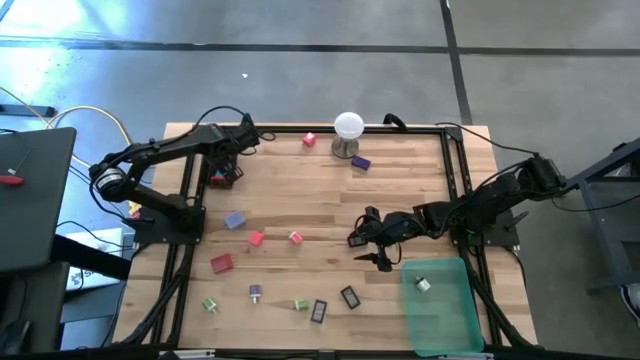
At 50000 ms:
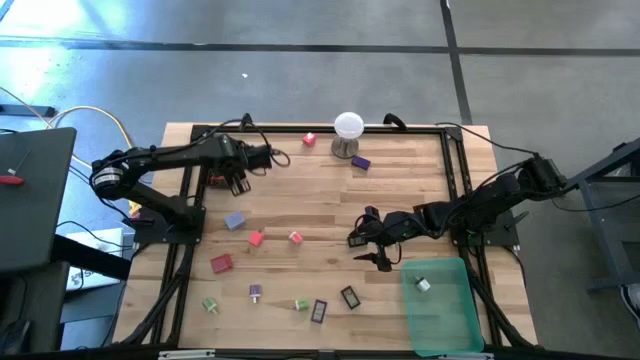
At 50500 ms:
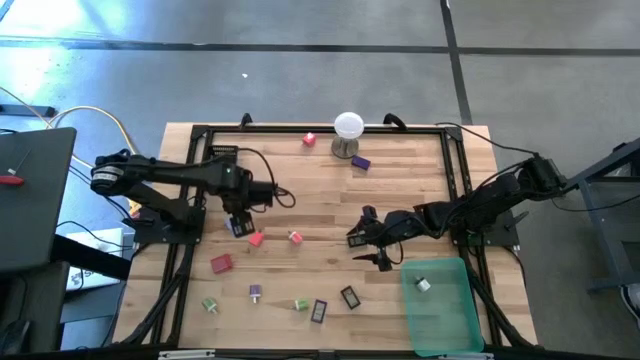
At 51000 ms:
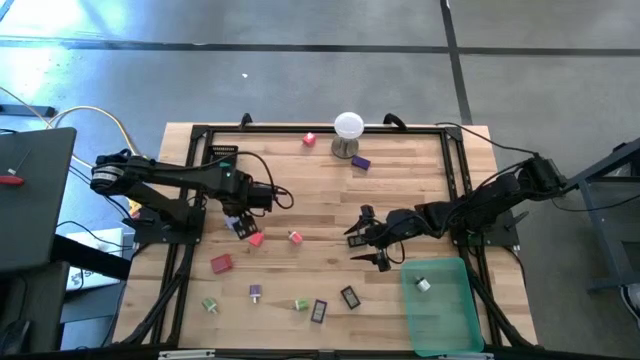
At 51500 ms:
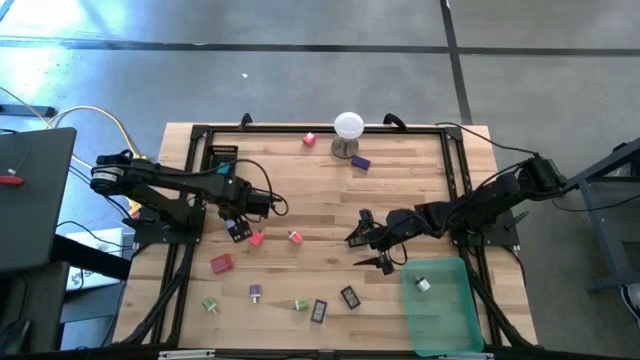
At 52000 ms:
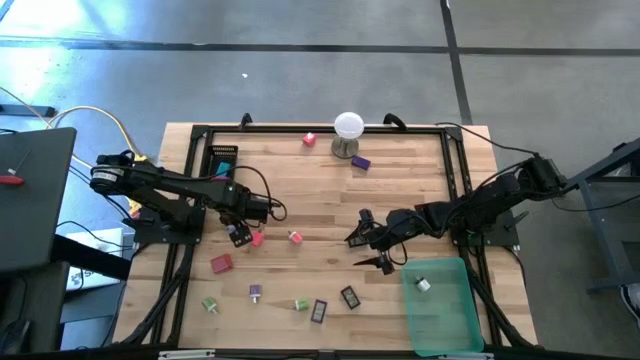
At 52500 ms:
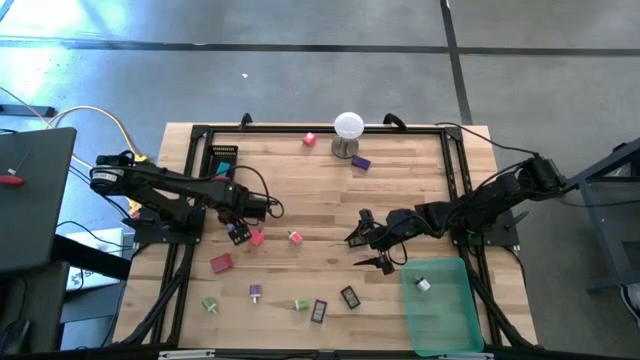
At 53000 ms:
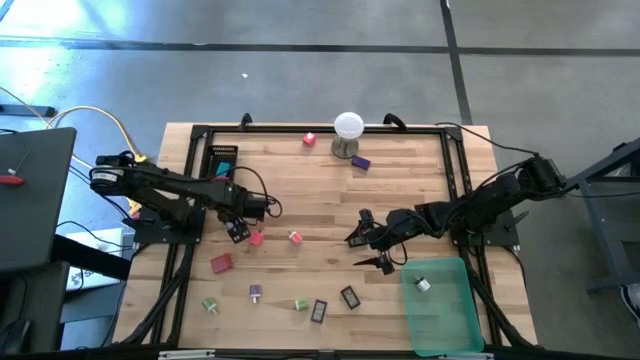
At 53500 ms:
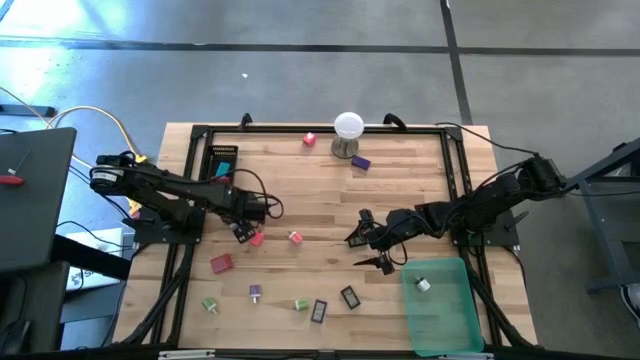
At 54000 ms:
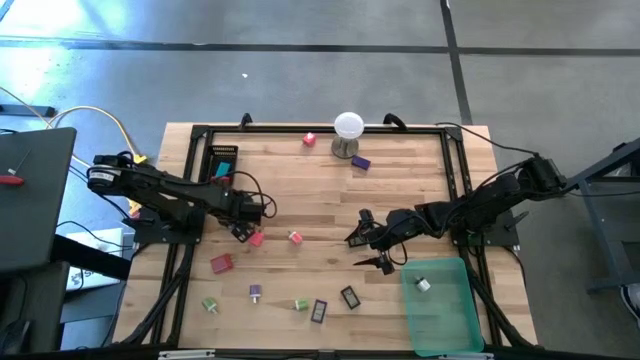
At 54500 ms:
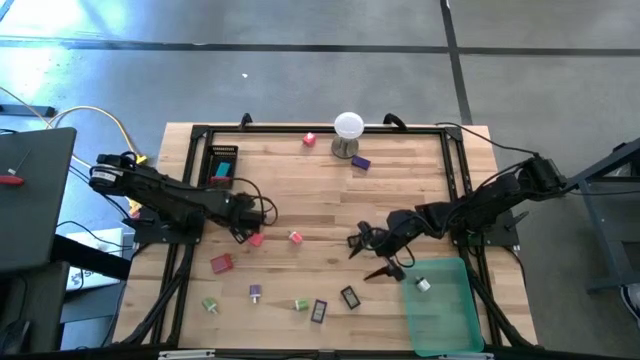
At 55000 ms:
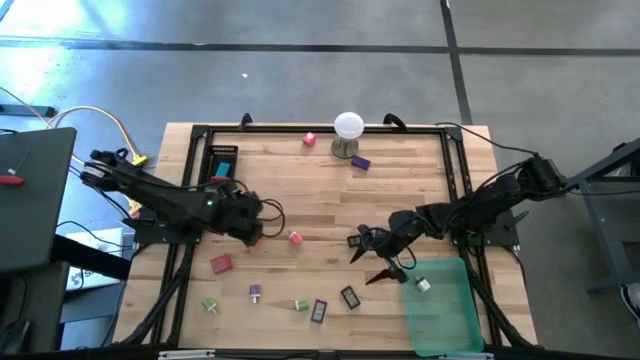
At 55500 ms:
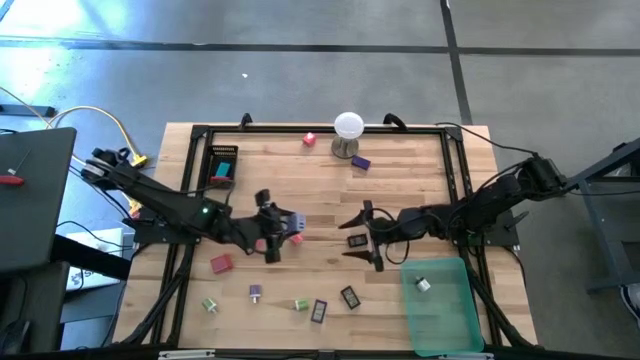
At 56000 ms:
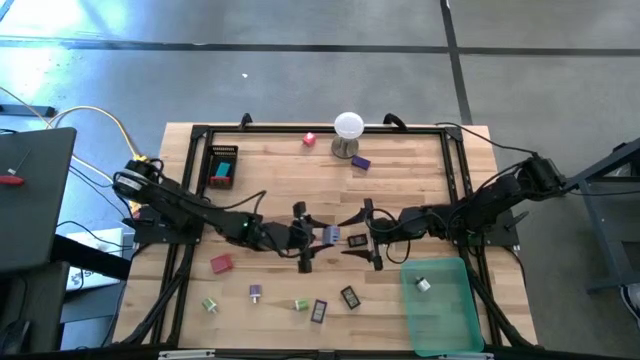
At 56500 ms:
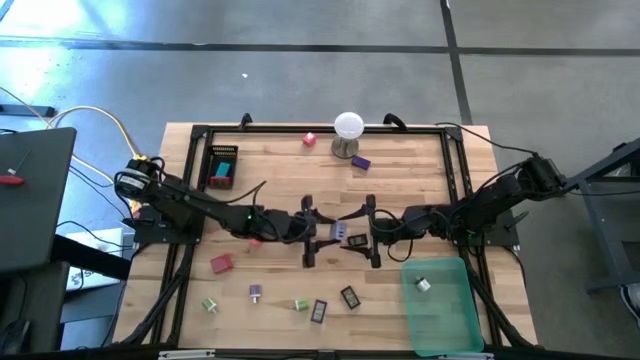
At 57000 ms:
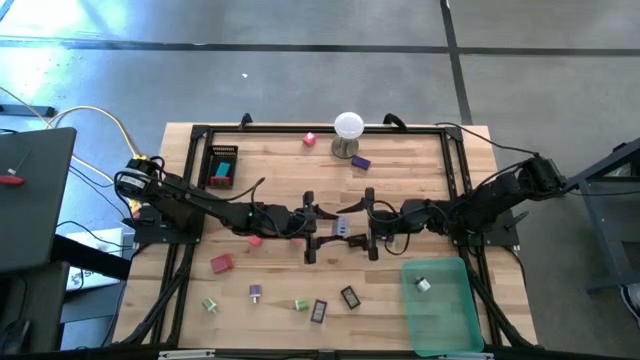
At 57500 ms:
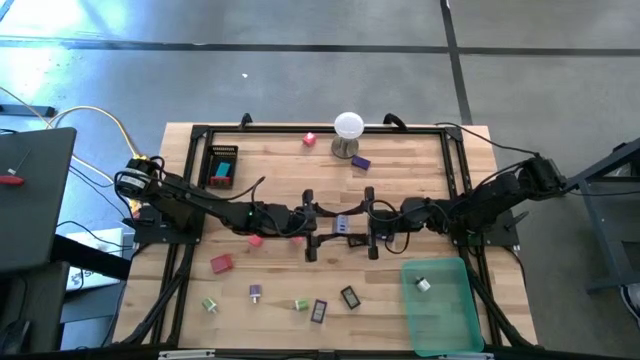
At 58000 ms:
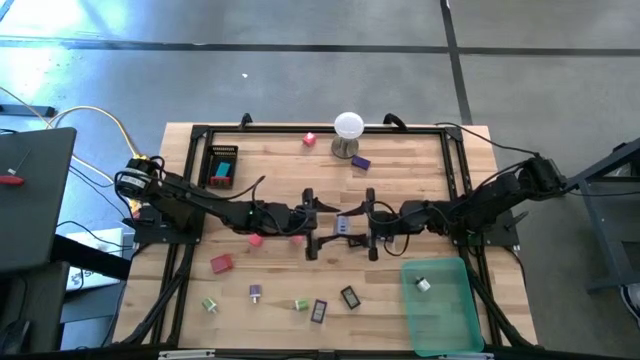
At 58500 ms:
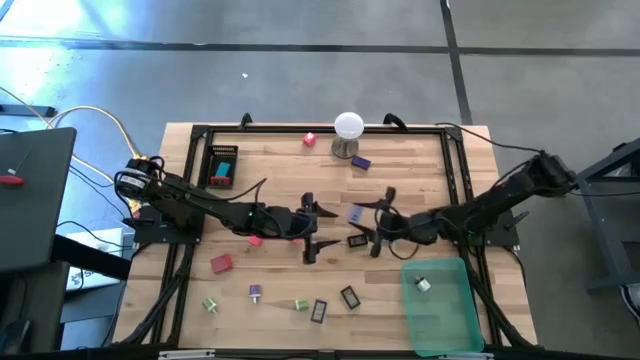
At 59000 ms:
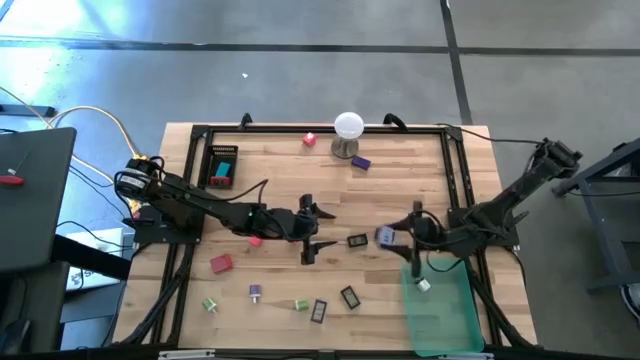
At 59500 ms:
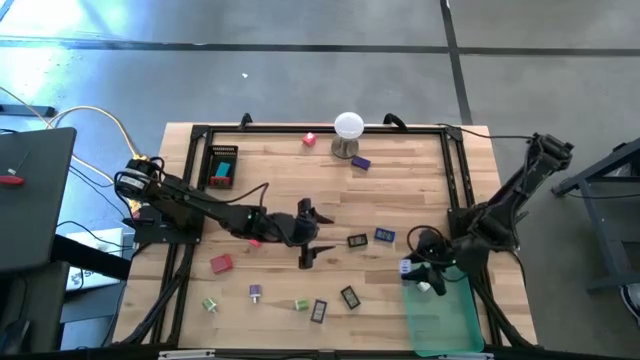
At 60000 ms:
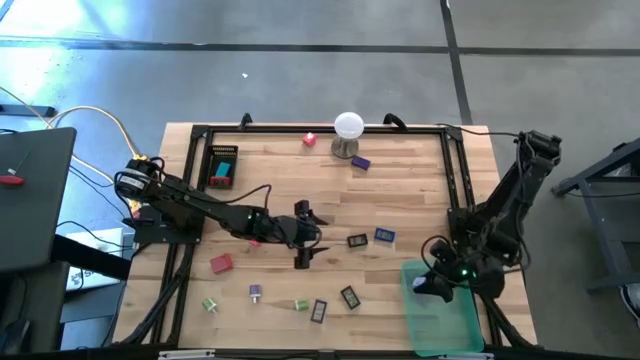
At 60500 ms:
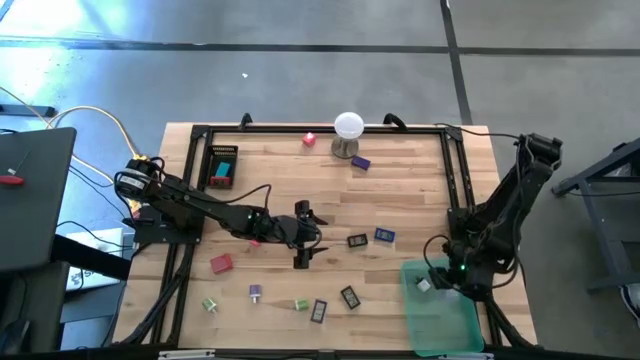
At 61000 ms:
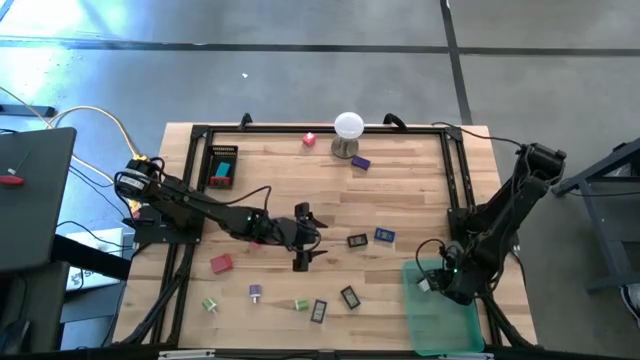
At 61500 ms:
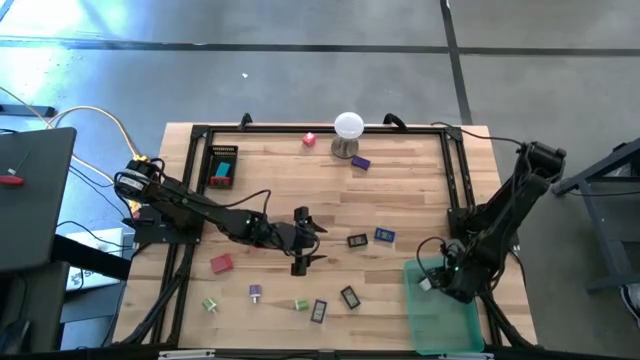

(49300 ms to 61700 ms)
Task: Pick & Place Office items
Put the purple charger adapter into the green bin

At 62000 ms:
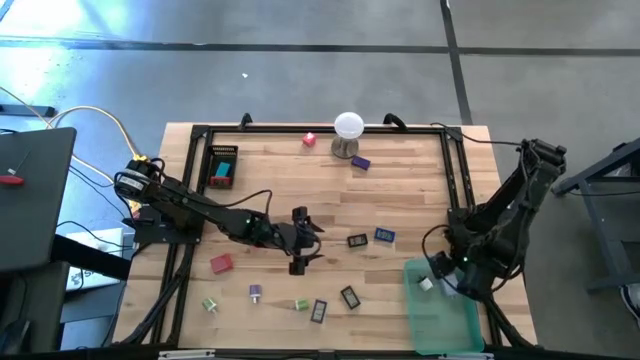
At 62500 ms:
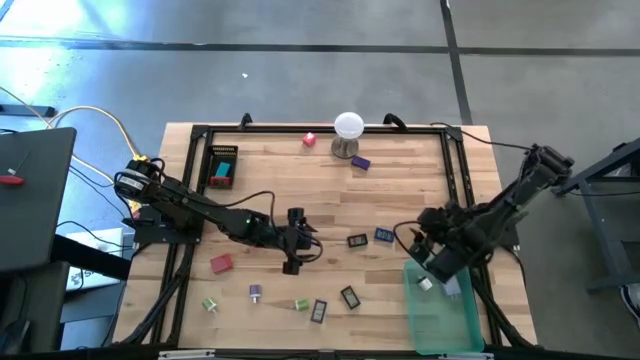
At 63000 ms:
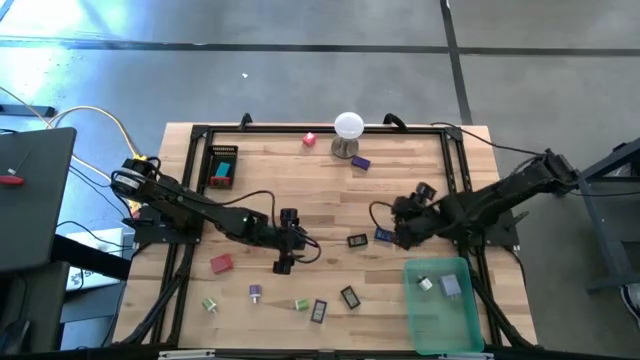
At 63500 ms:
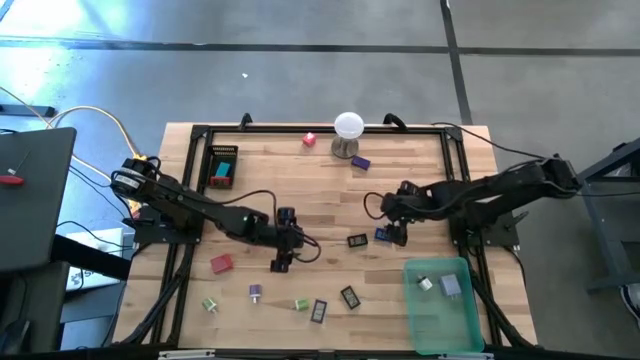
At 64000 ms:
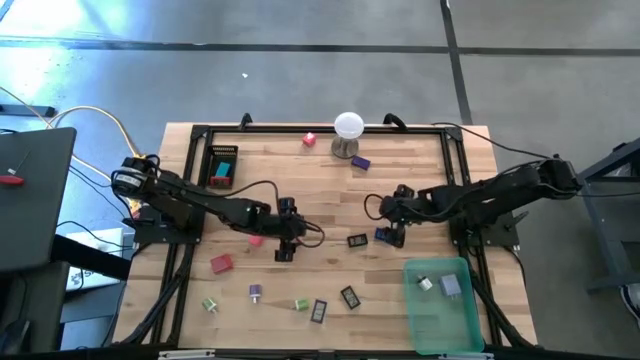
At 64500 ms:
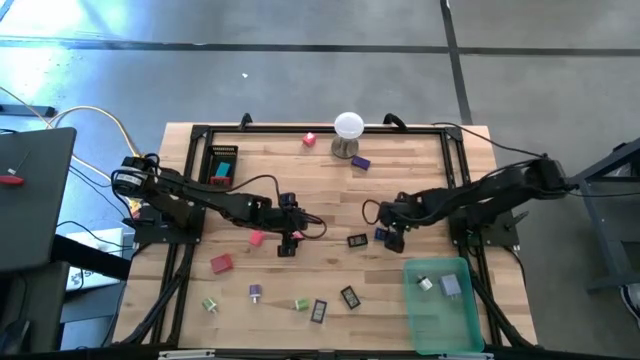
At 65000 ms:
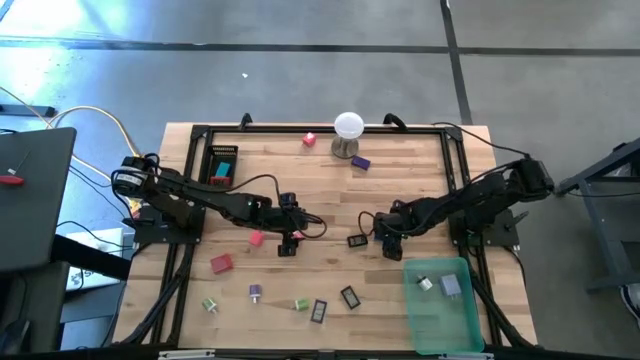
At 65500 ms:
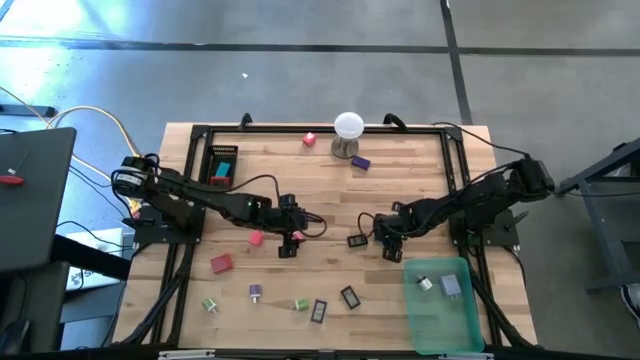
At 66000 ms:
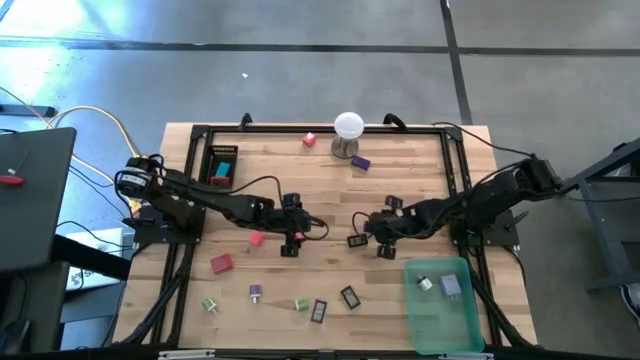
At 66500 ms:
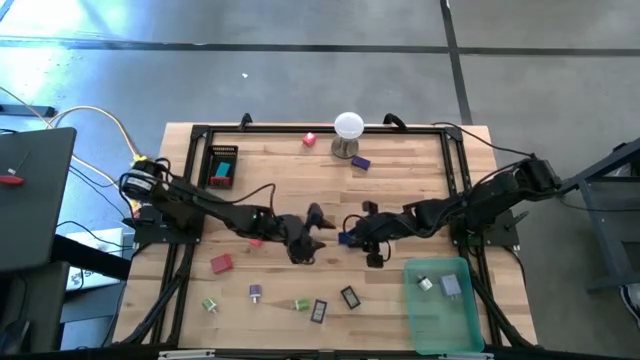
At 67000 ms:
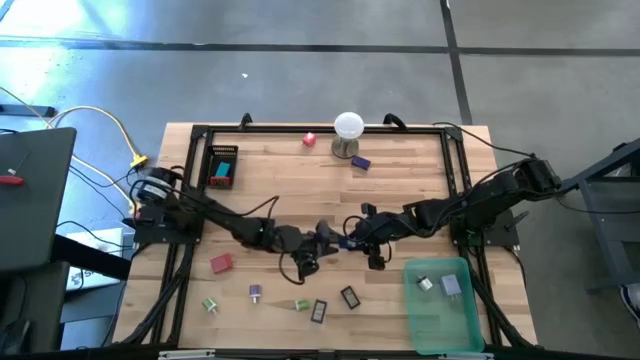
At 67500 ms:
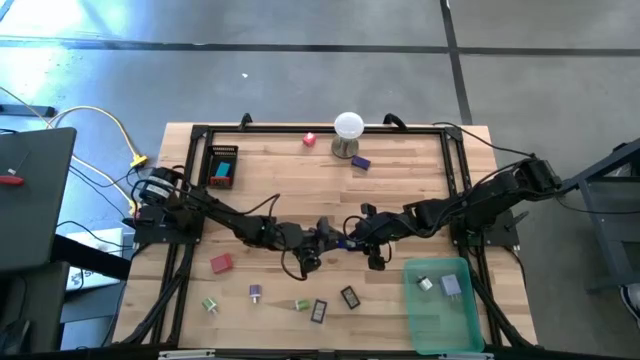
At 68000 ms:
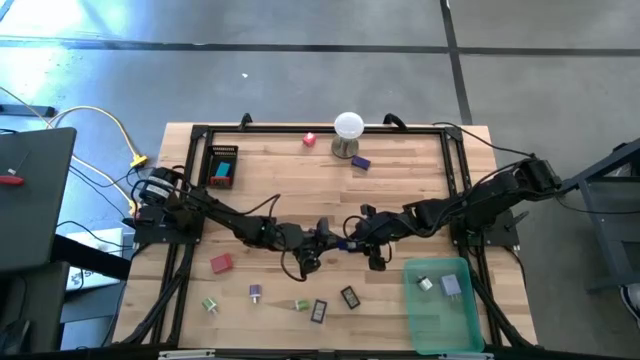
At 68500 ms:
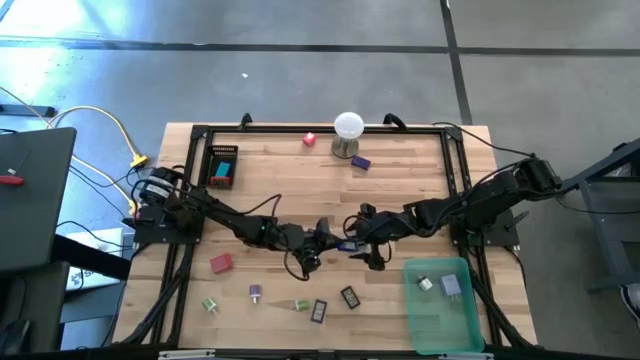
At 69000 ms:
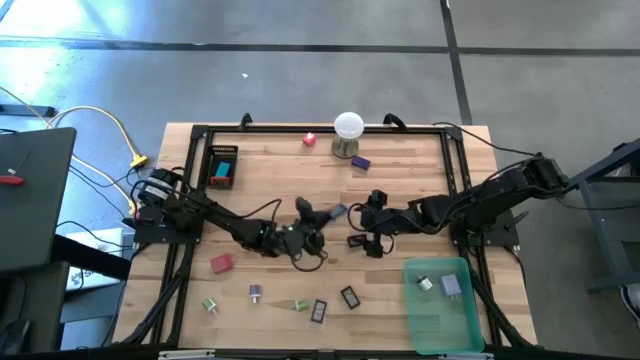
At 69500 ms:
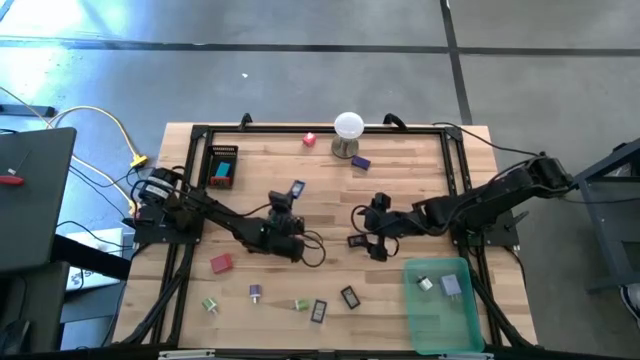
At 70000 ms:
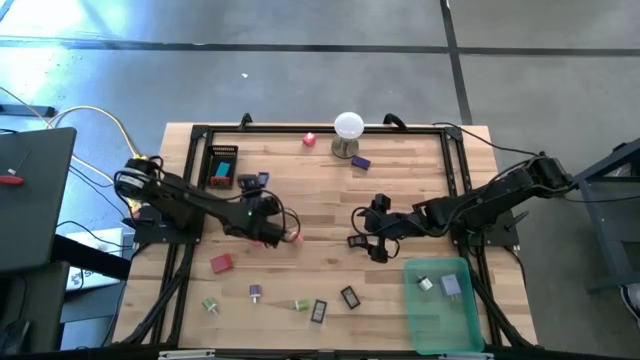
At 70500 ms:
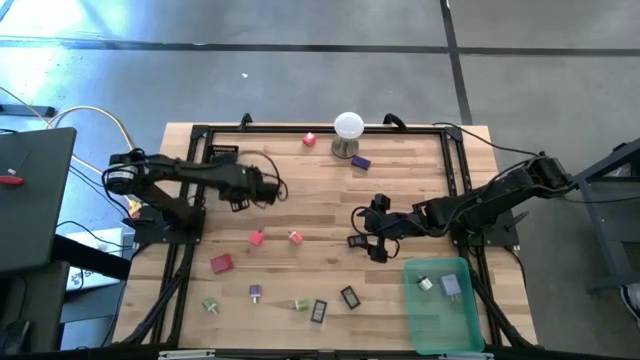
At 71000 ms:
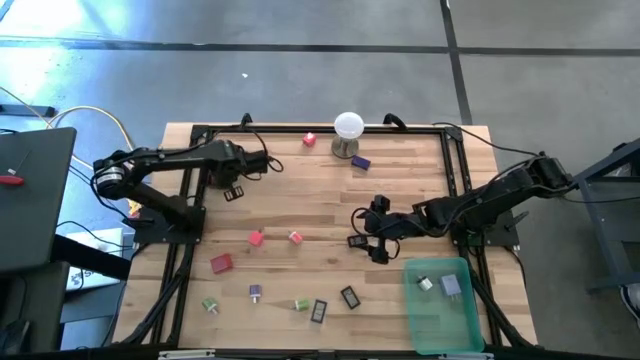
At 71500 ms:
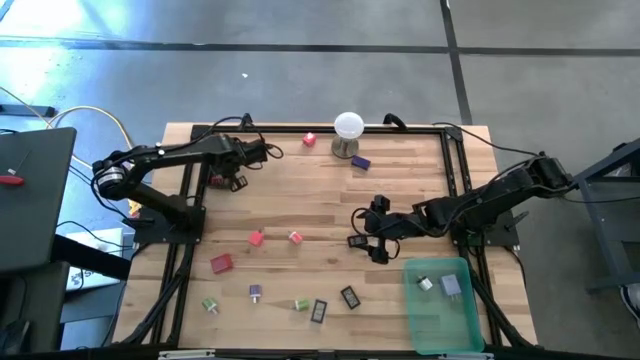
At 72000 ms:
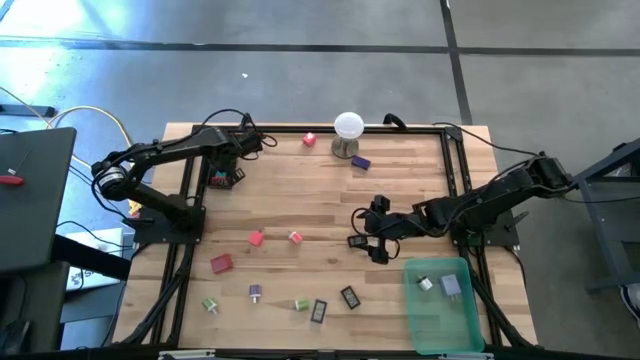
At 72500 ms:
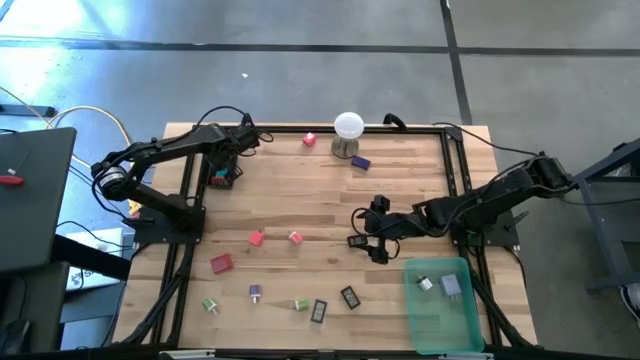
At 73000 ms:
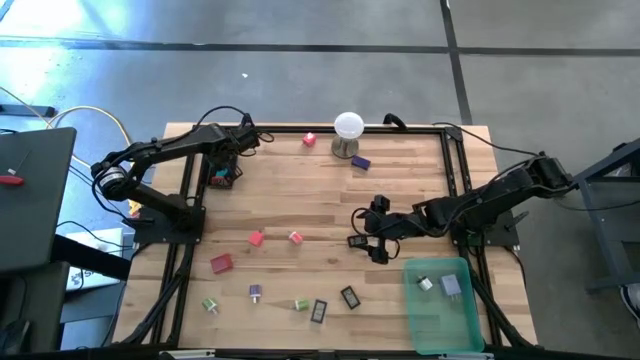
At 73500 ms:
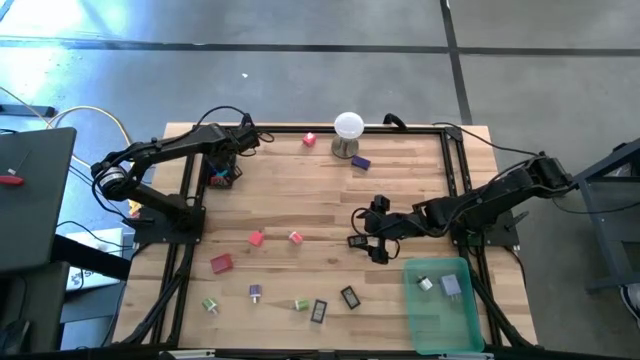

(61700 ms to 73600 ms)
Put the blue digital clock into the black bin
